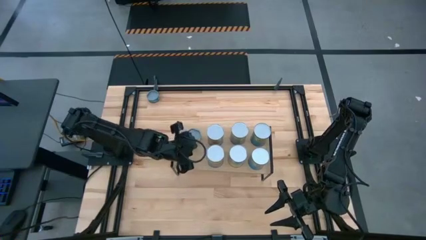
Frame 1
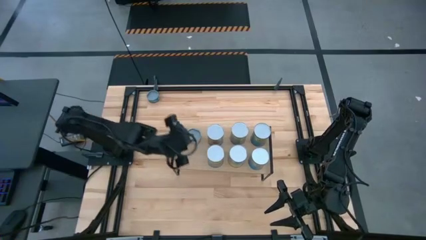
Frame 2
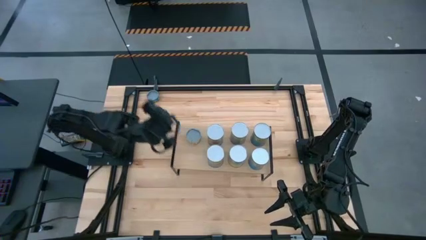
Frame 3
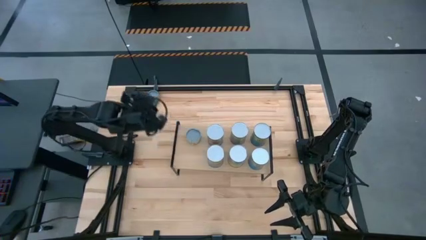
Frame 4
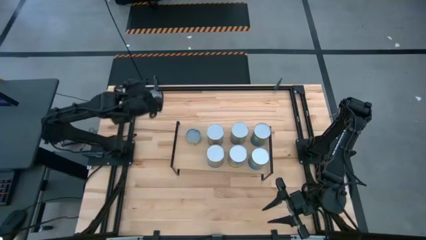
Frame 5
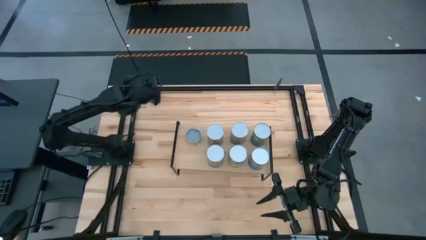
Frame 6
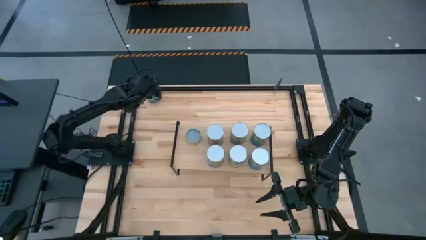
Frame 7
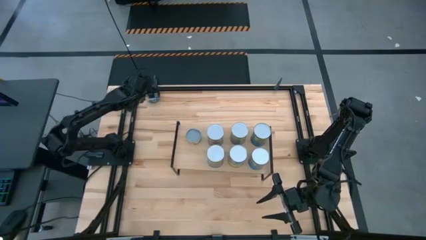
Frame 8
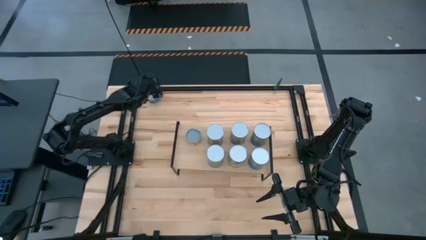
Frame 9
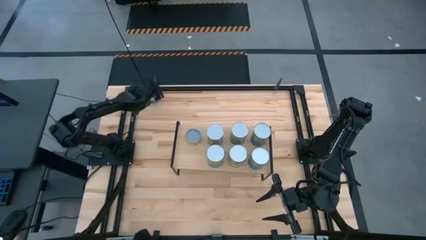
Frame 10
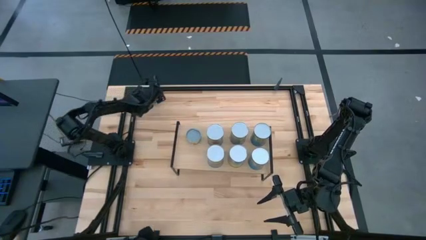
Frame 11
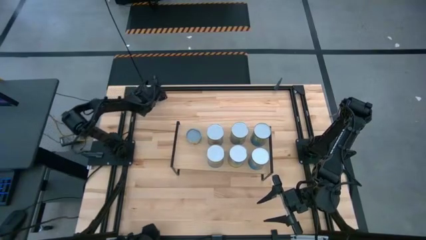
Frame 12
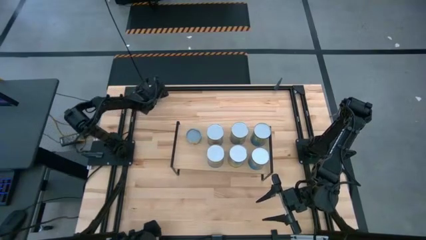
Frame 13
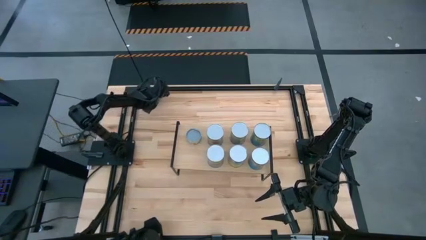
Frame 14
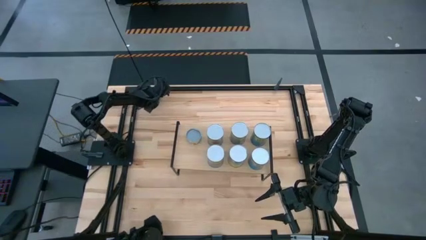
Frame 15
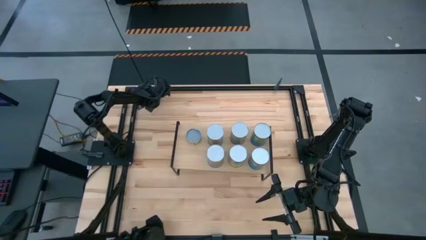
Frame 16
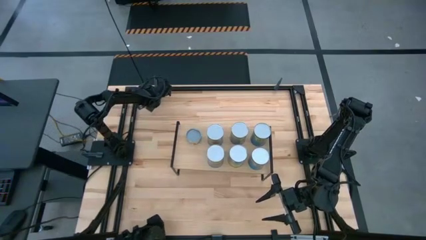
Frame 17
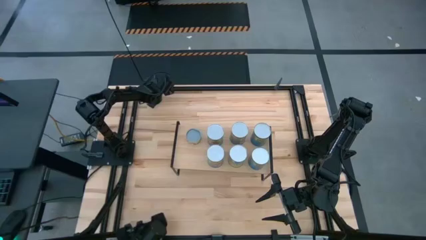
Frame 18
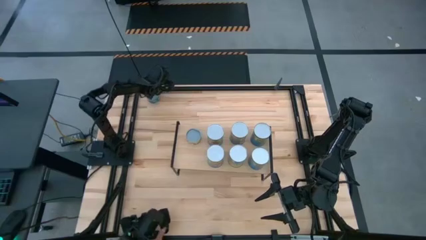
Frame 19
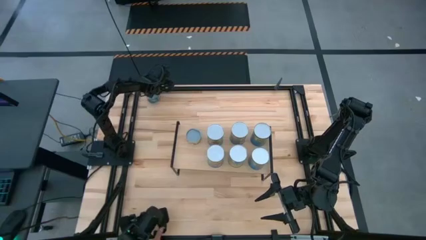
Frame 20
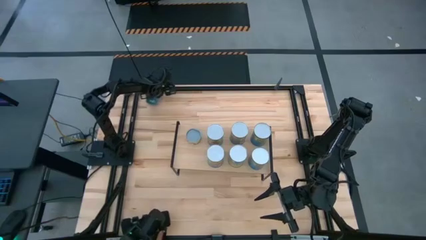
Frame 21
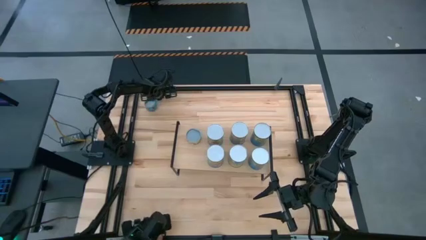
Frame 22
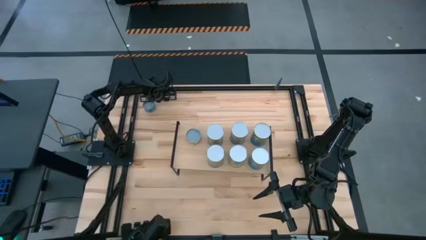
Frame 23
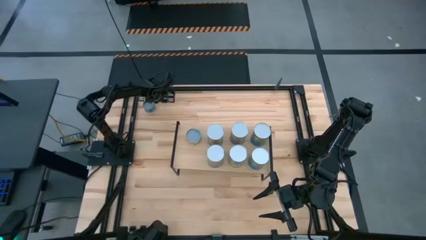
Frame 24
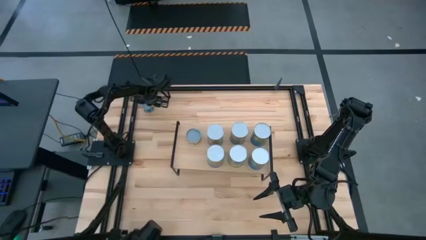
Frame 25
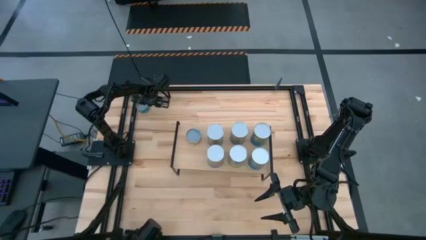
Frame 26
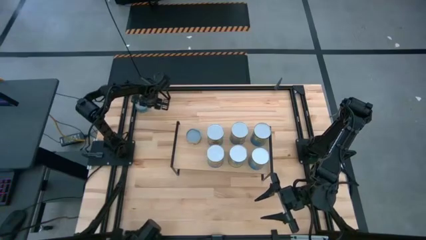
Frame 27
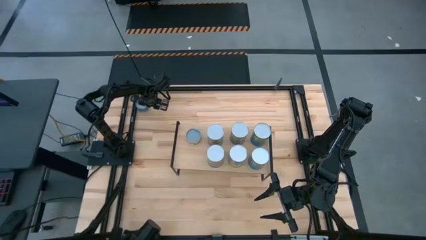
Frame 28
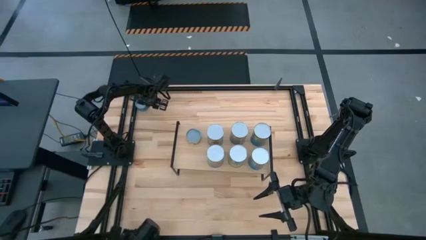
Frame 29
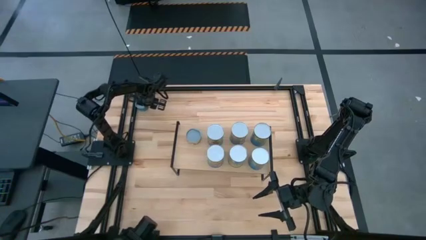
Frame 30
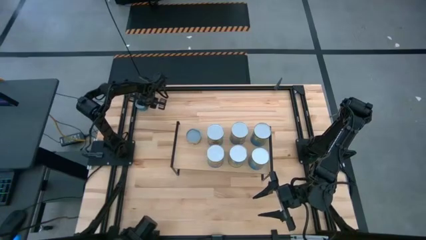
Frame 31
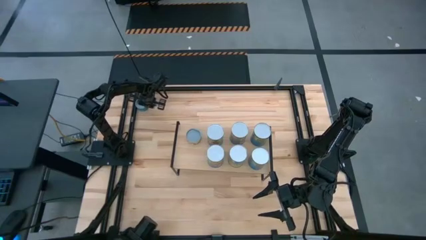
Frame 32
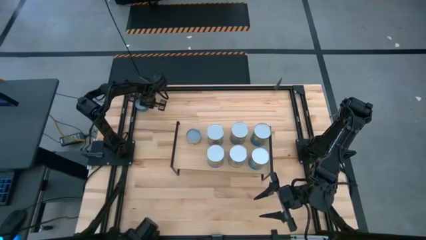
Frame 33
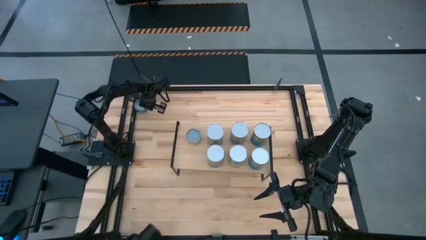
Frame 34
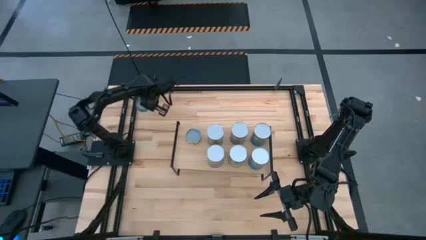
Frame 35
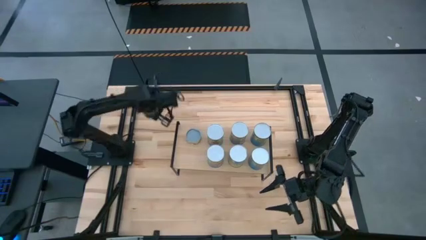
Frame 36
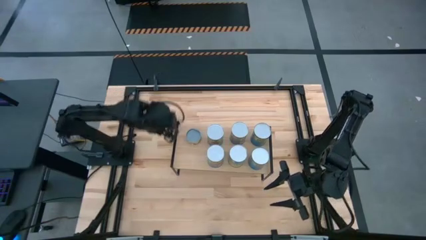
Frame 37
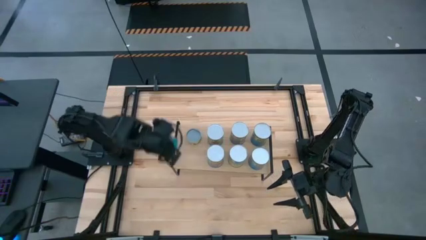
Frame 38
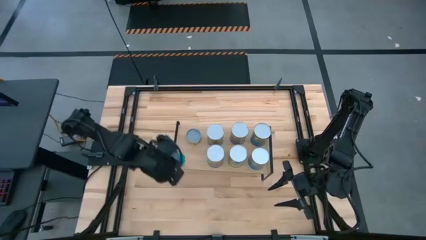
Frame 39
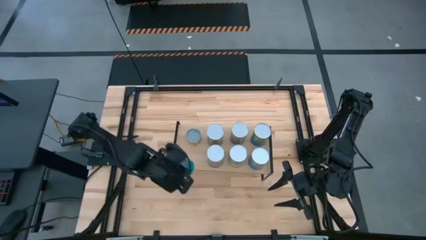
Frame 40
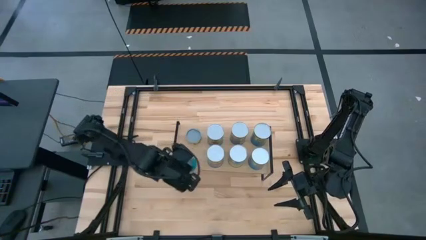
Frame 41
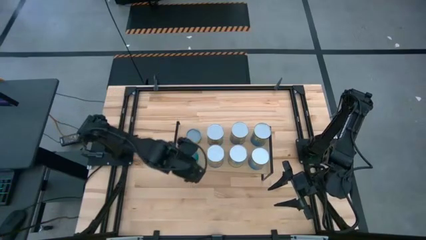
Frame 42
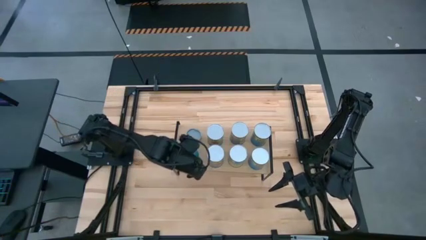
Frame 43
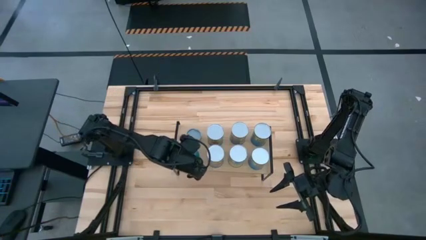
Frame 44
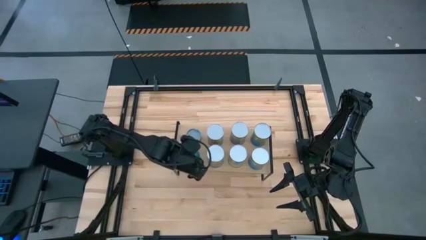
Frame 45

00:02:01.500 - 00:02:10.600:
Task: Pick and place cans onto a shelf
Put the canned tuna on the shelf

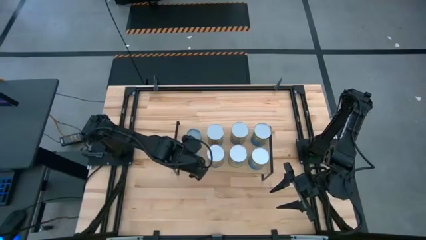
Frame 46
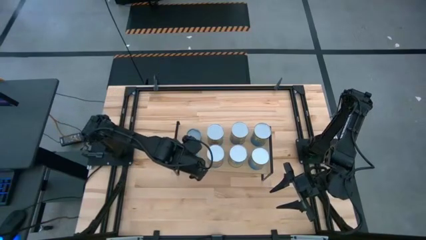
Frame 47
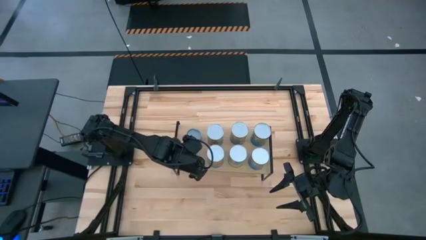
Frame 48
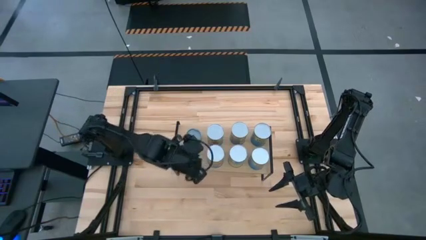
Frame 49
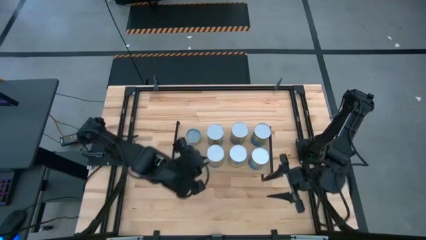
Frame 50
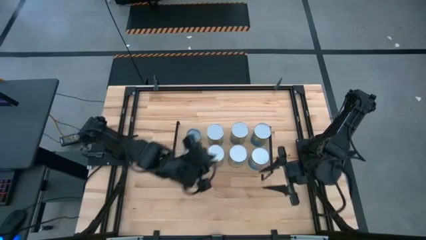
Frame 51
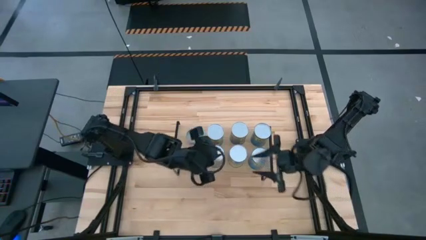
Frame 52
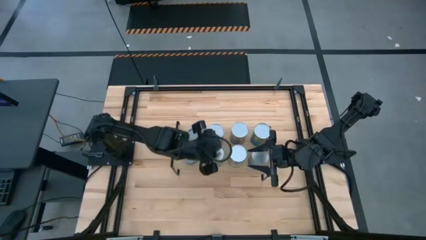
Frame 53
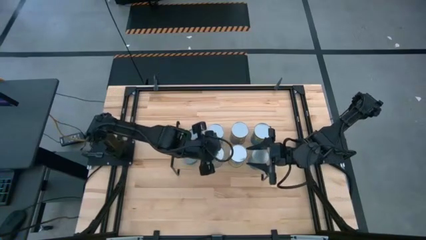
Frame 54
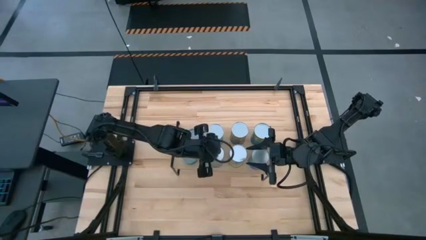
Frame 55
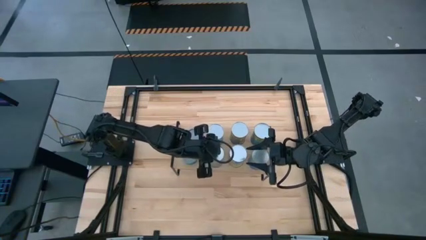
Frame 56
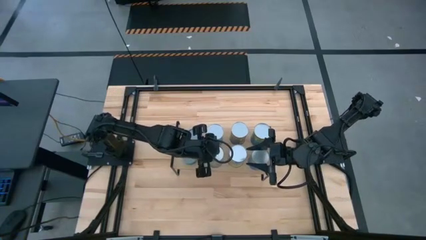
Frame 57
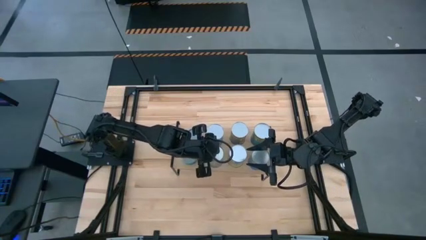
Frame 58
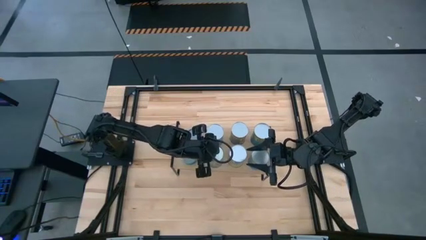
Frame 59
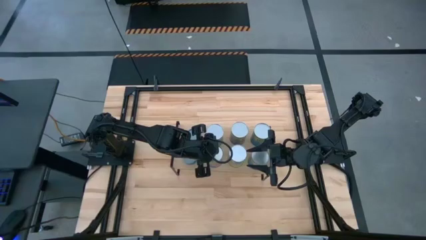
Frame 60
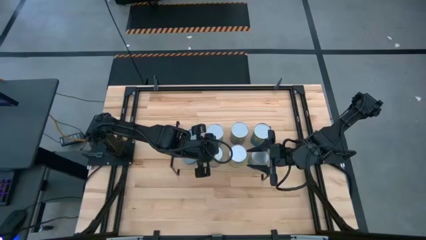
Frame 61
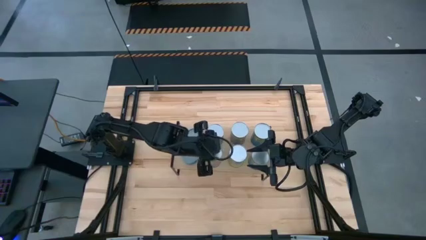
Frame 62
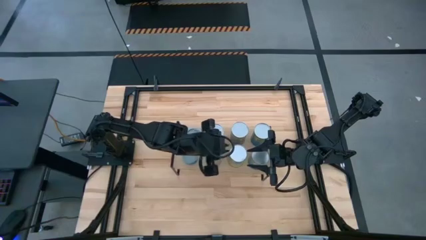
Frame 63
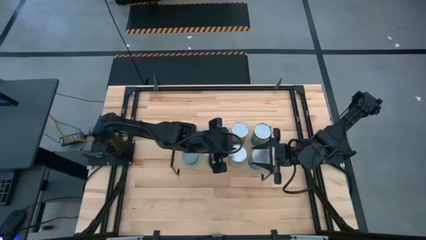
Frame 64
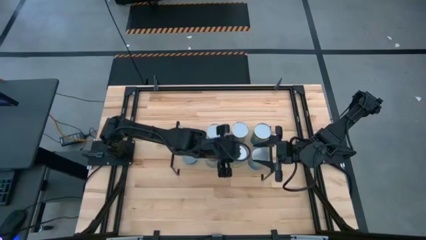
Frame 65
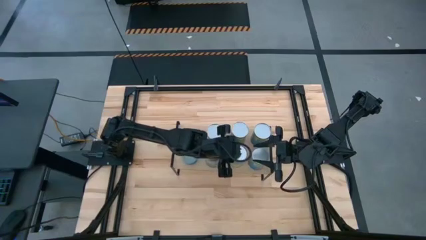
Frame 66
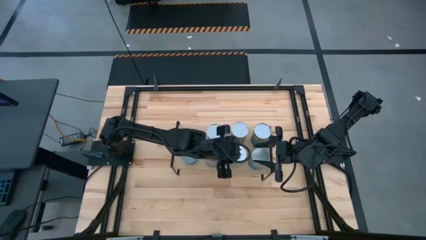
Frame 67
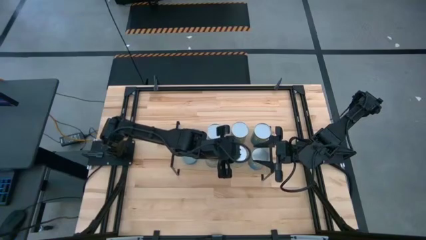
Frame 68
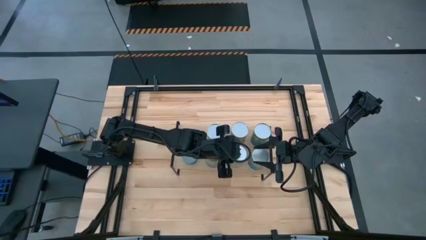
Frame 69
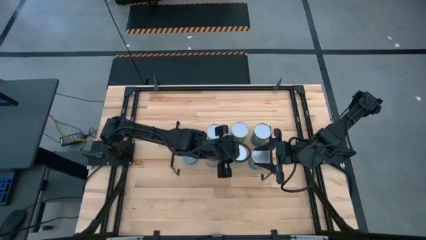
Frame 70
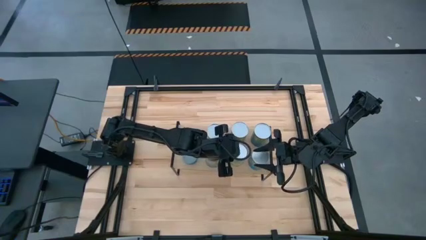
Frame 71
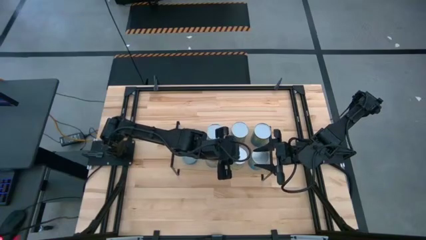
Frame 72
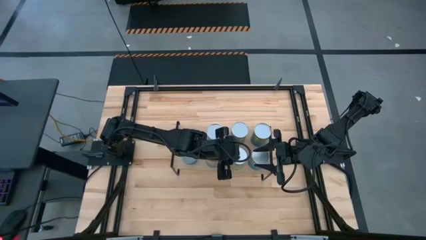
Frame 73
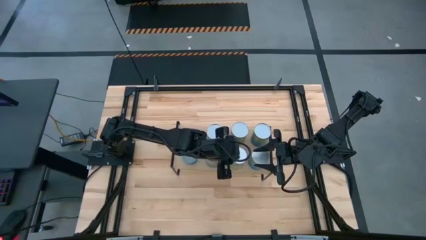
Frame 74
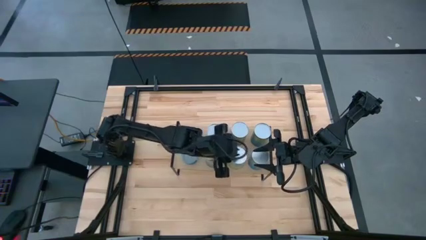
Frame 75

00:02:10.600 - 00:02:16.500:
Adjust the canned goods on the shelf

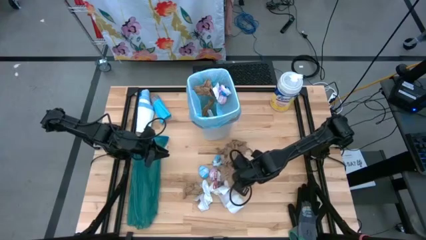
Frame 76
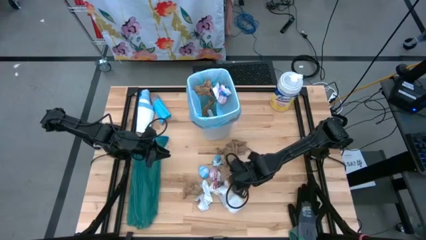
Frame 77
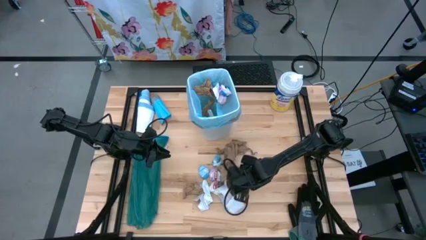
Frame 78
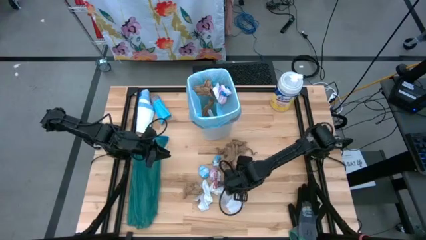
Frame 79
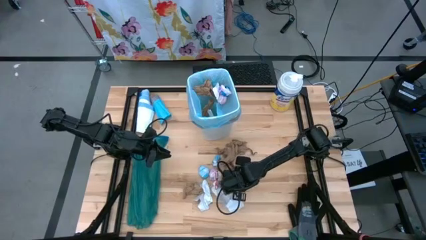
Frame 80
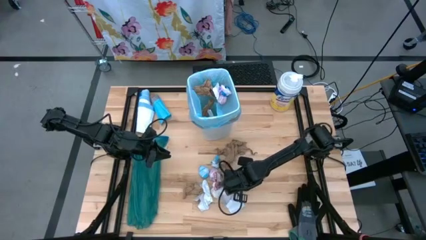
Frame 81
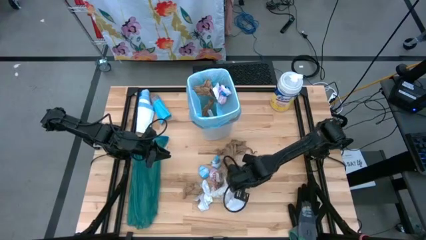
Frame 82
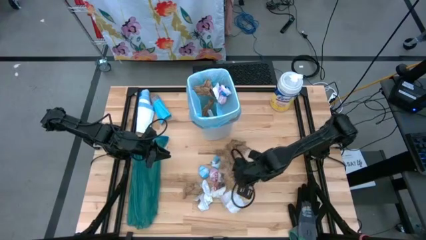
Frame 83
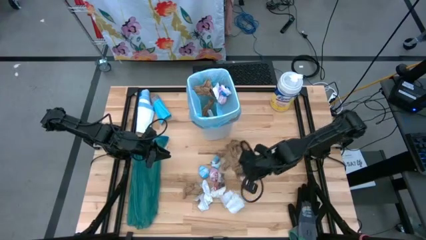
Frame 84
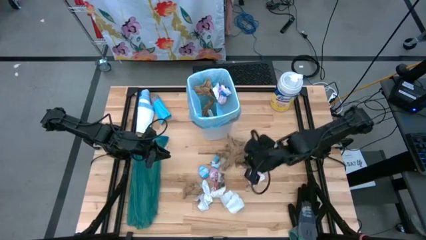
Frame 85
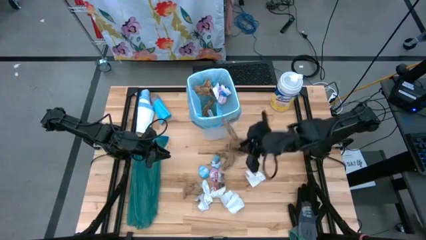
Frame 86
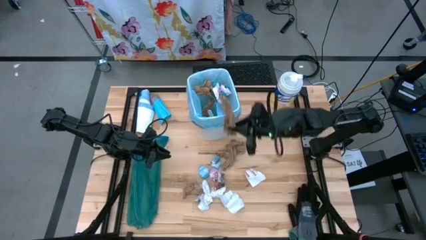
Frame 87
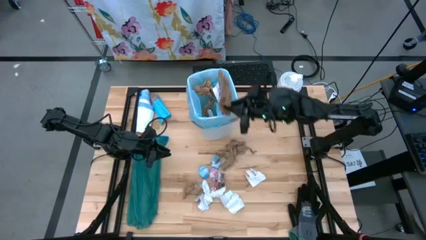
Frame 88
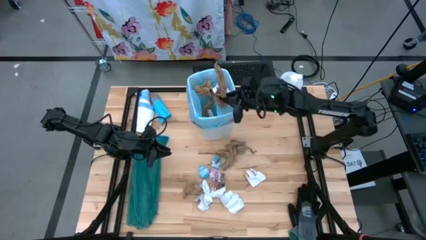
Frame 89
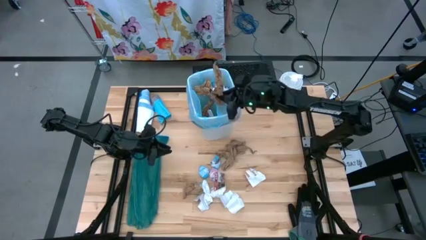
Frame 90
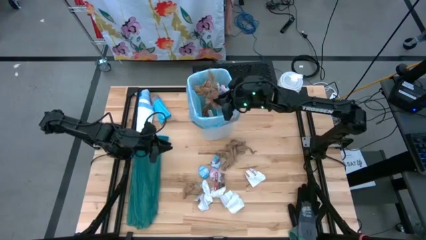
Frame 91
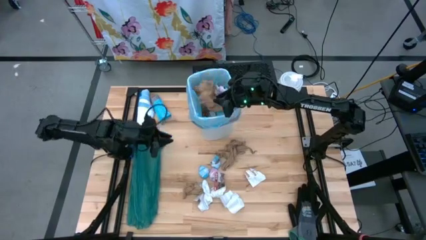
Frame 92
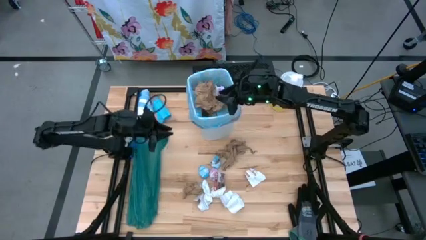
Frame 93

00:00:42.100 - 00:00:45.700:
Task: place trash/remove bag and relplace
Put the brown napkin into the trash bin
